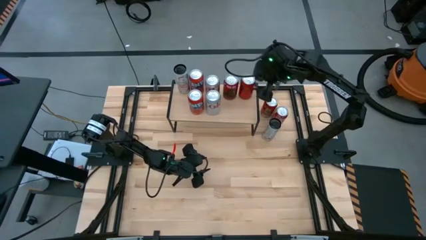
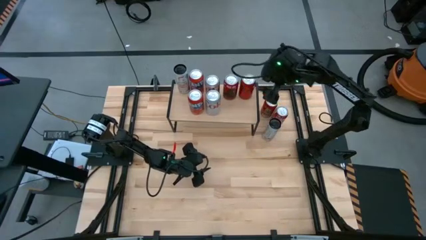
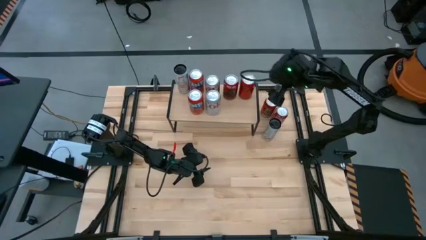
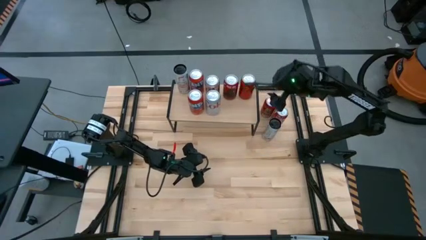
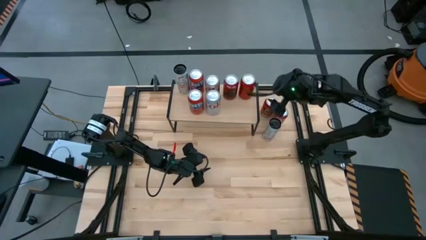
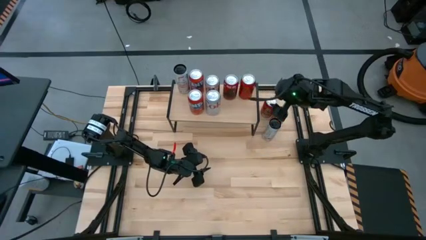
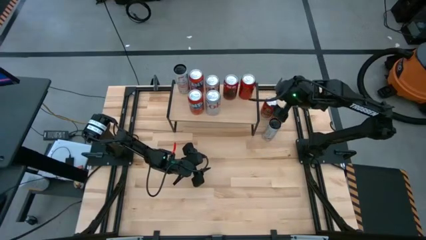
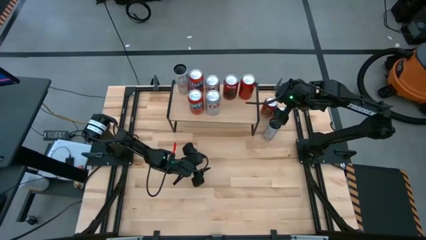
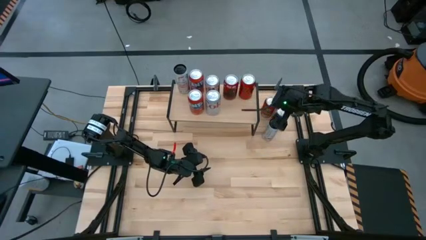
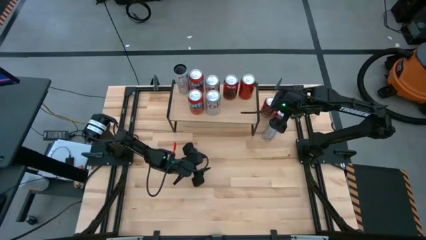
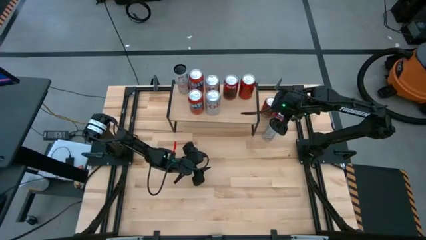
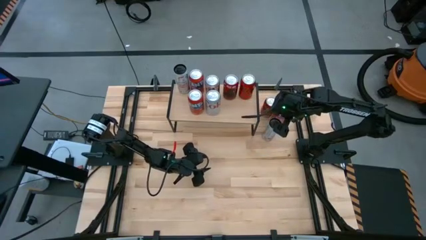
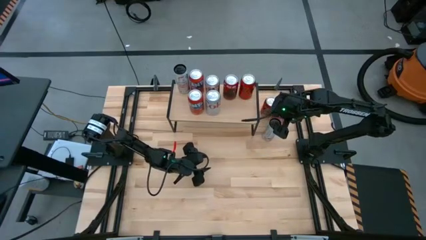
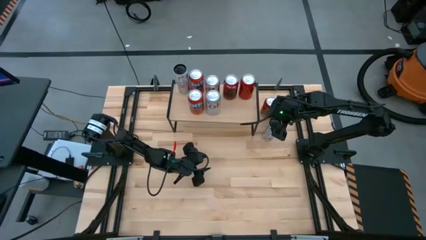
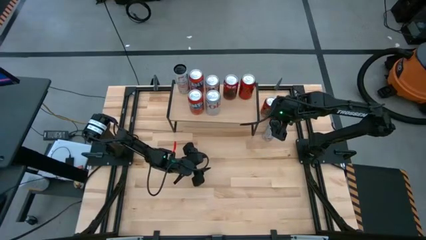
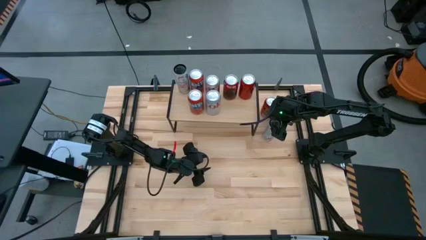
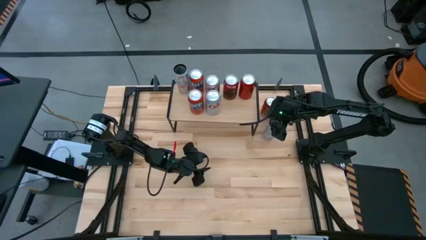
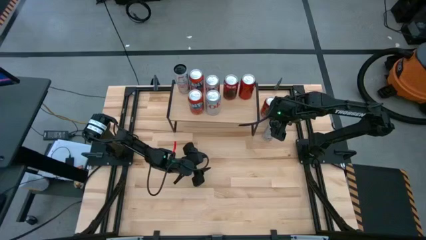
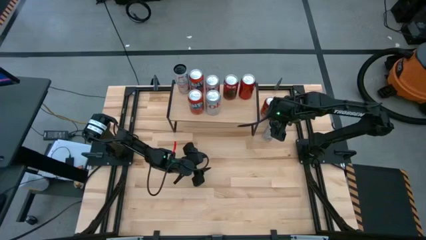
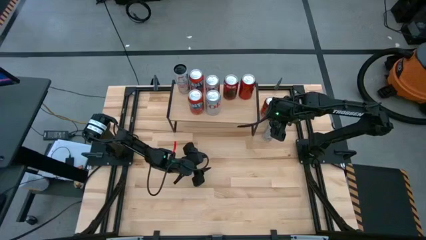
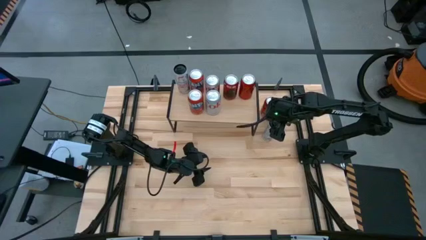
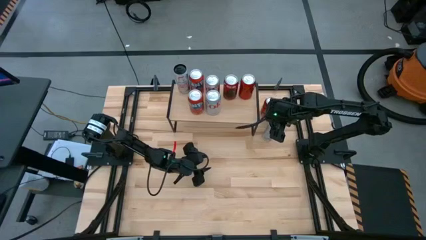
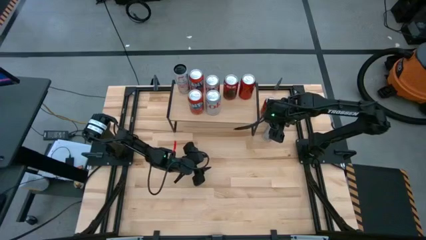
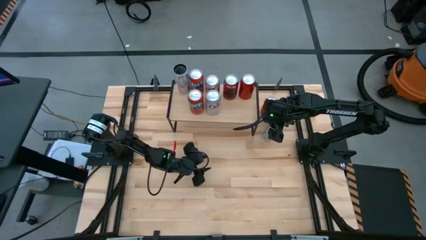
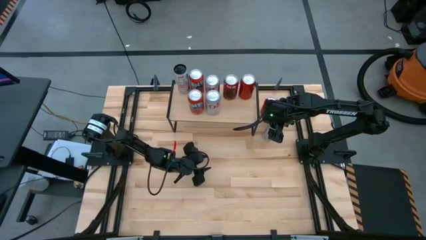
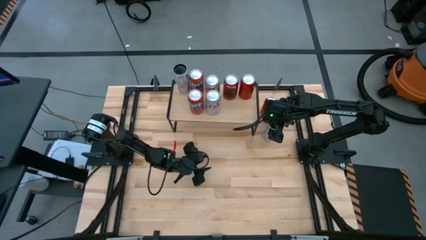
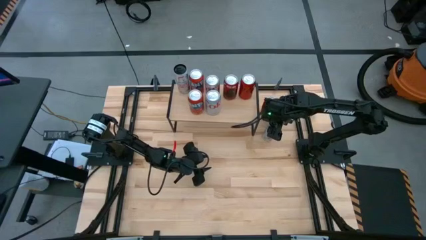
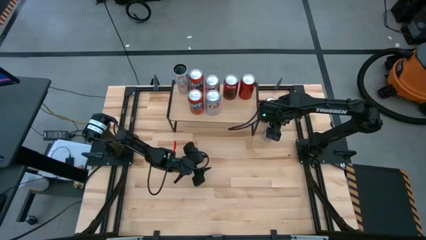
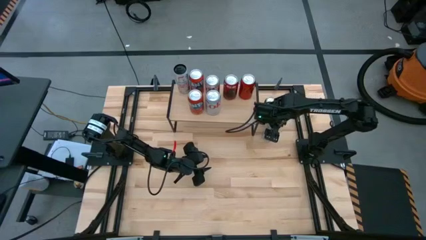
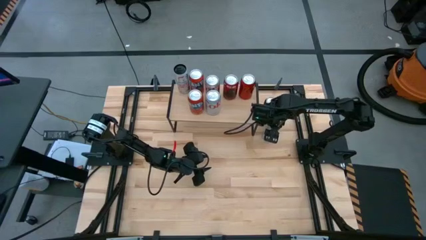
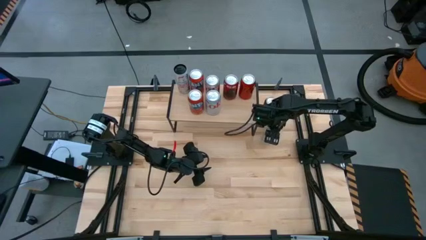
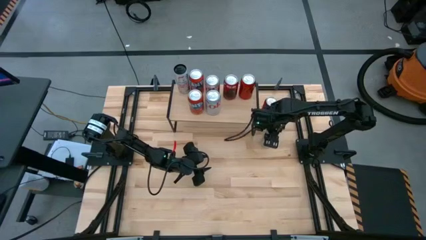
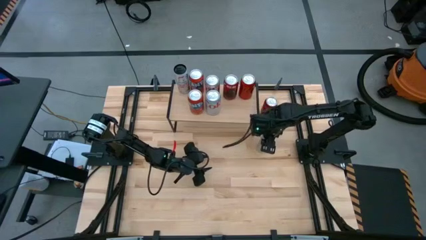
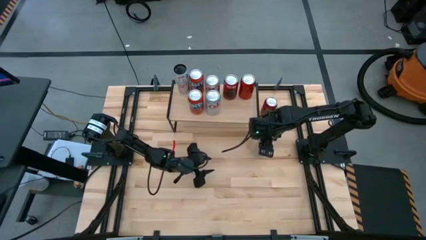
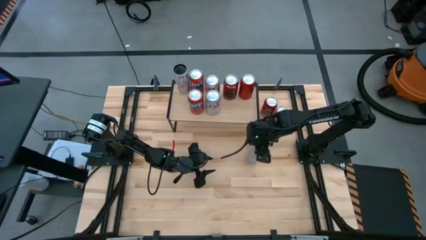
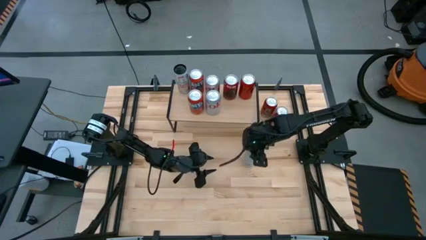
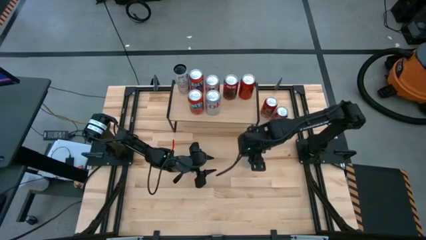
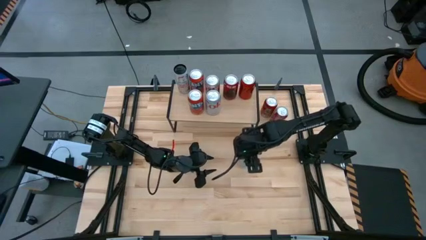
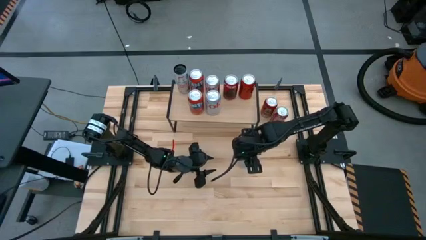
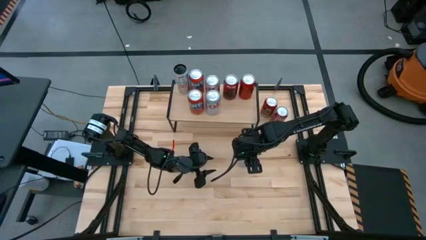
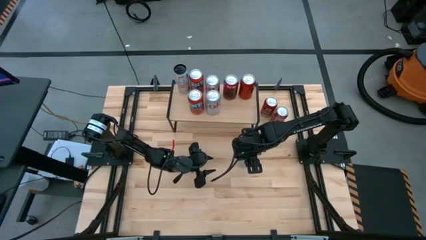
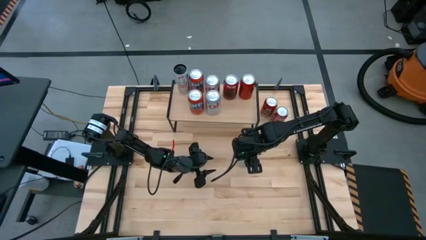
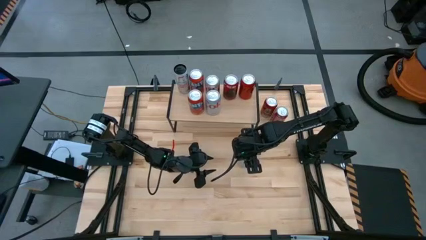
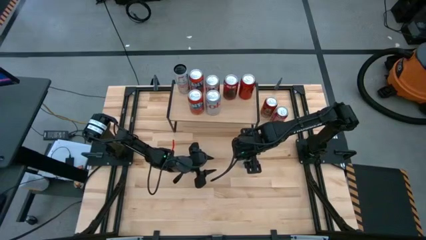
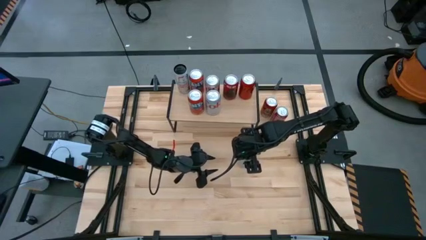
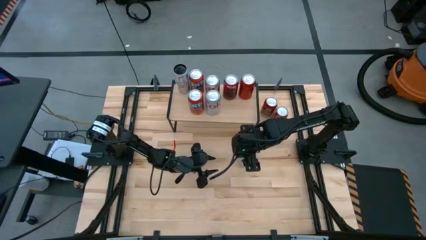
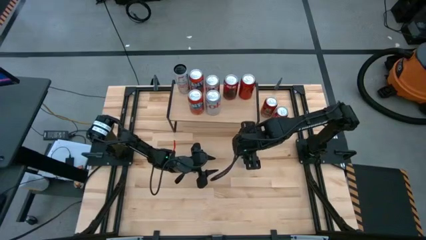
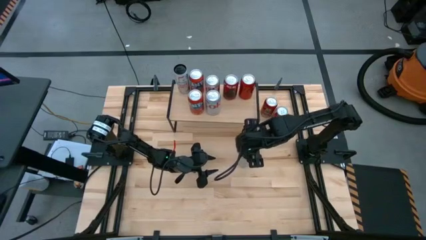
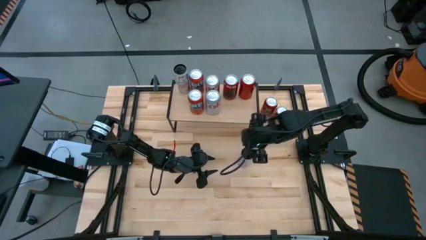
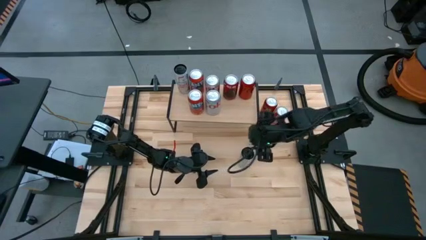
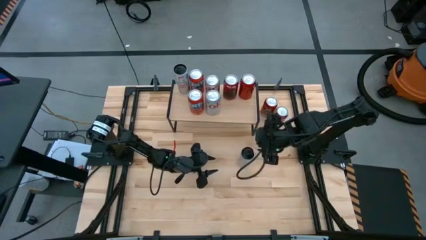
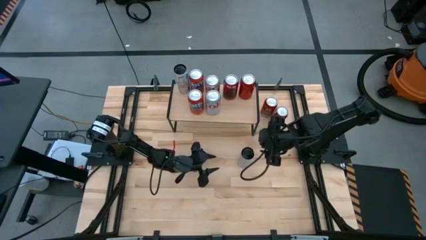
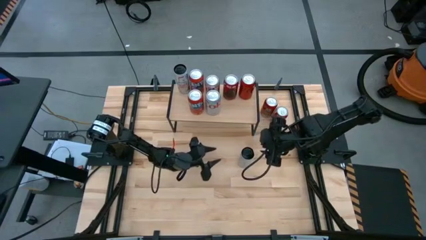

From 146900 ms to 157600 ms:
Task: Place canned beverage on shelf
Move the white soda can to the middle right of the table

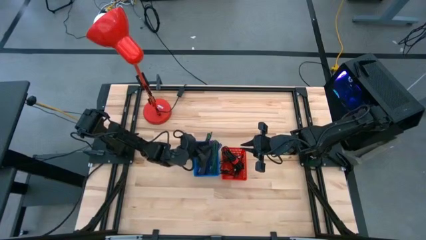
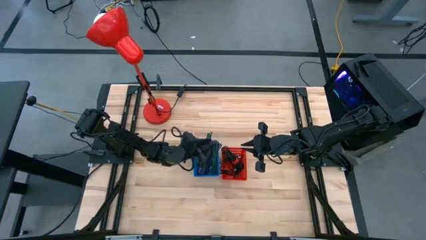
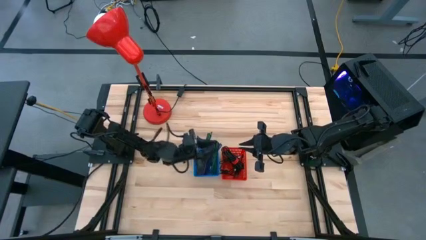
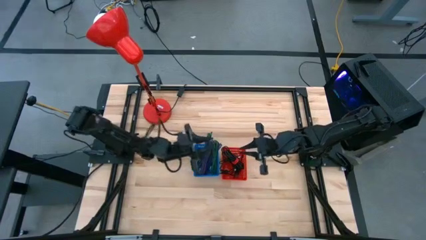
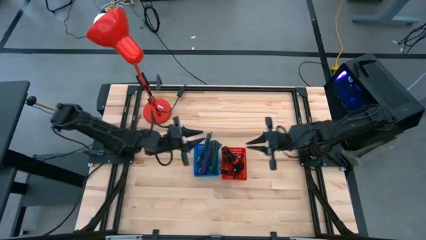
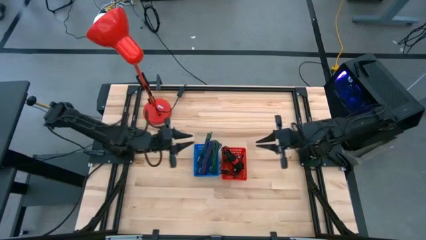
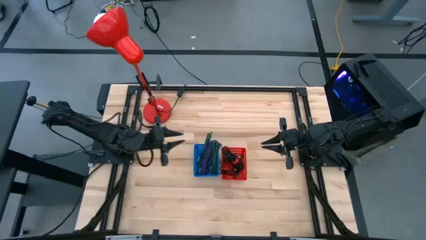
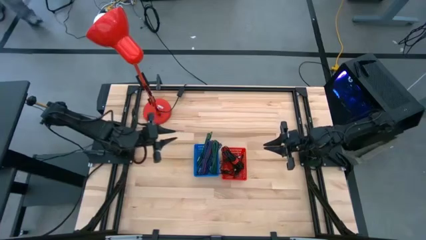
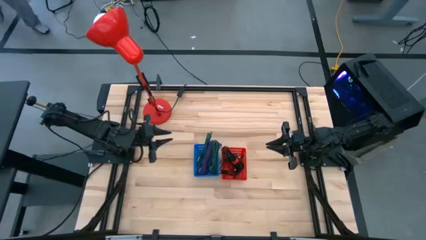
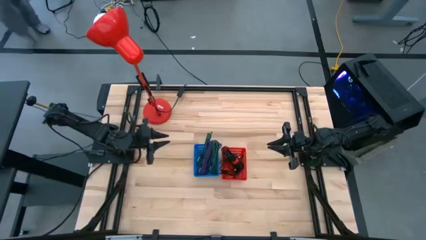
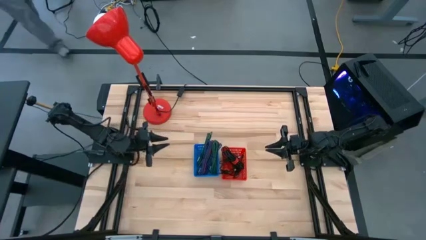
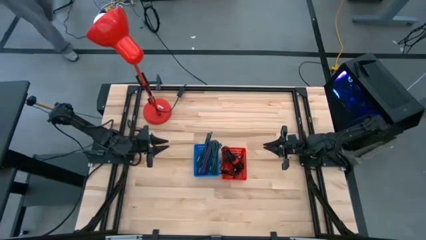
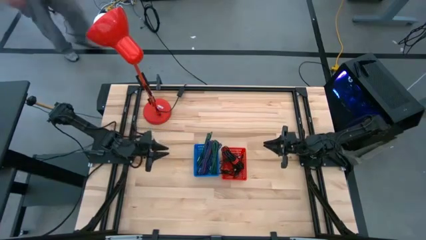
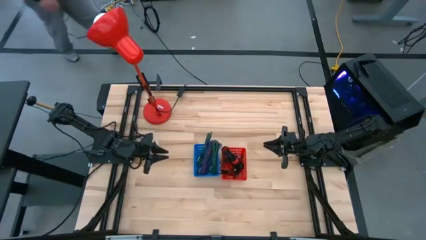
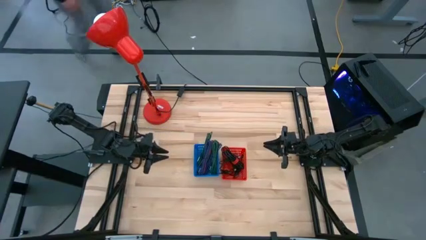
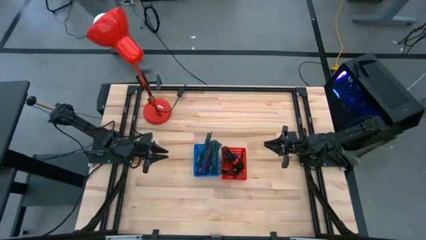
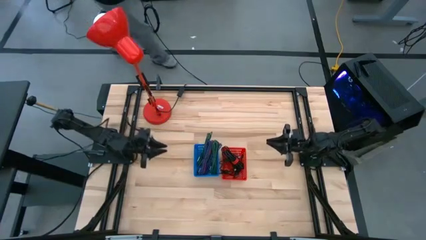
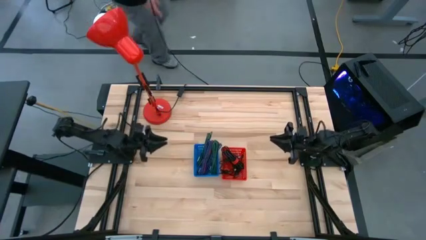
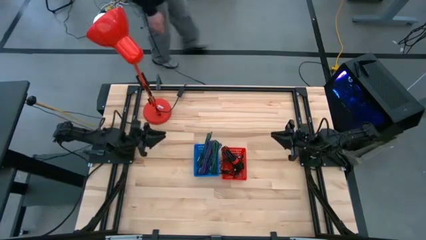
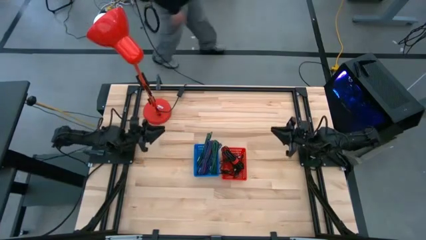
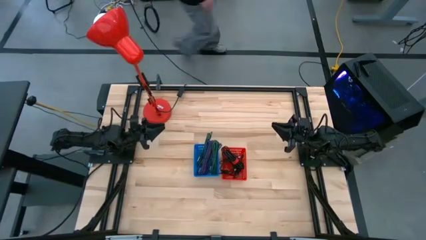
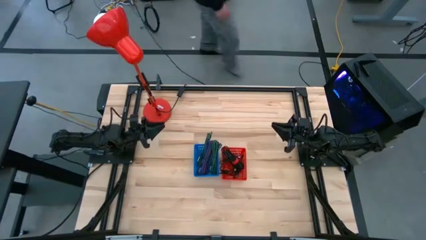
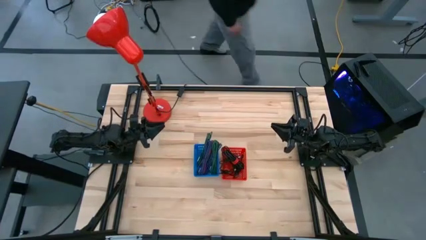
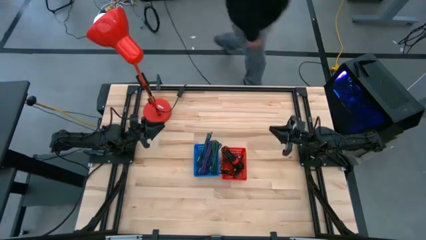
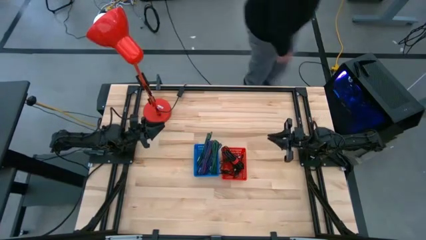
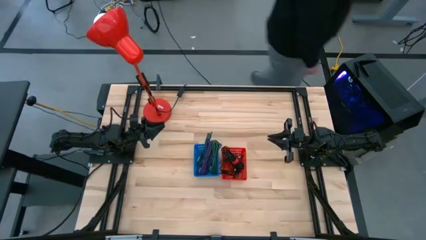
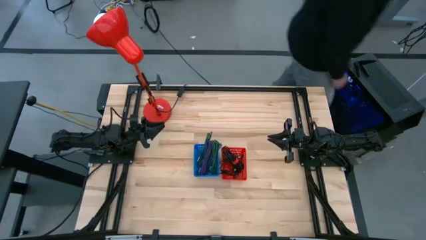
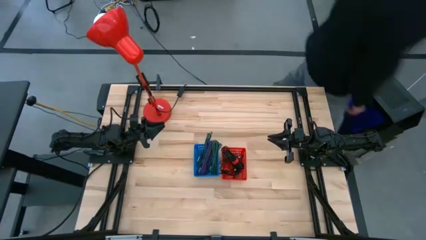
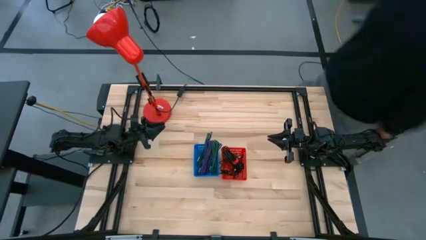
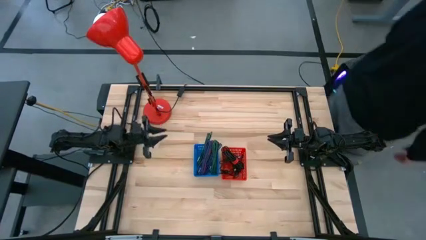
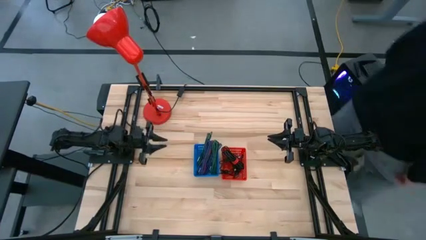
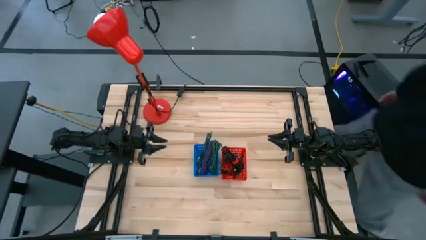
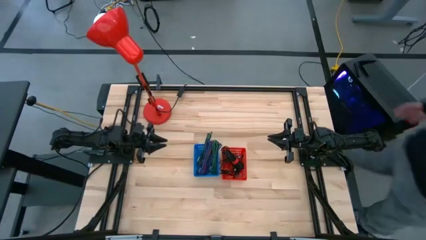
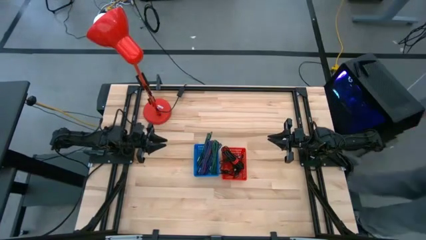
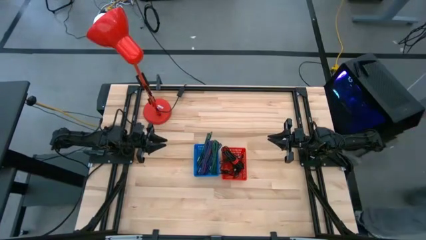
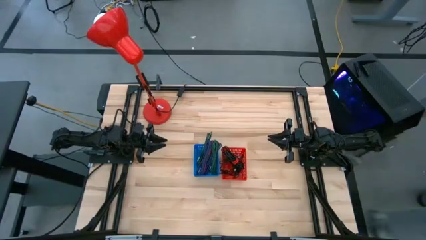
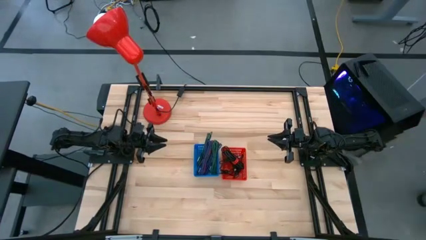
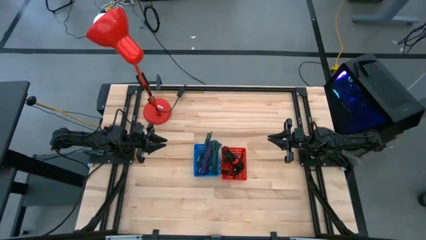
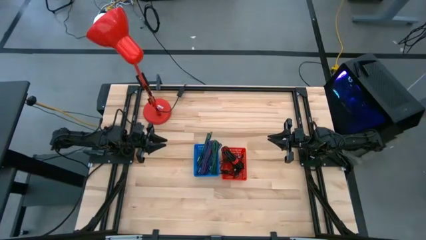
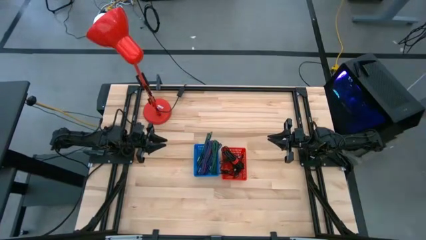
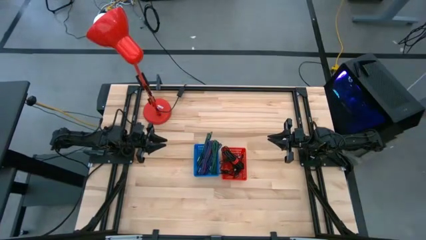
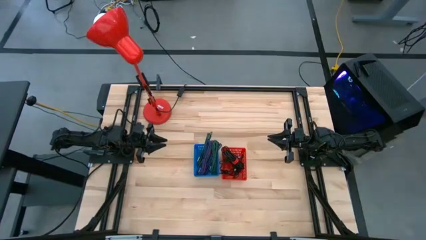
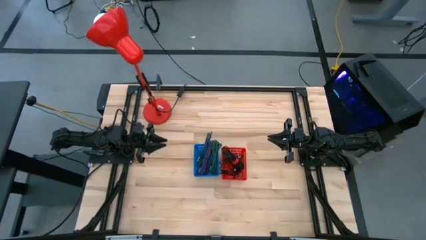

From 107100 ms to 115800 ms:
Task: Pick & Place USB Port
Return to Home Position
